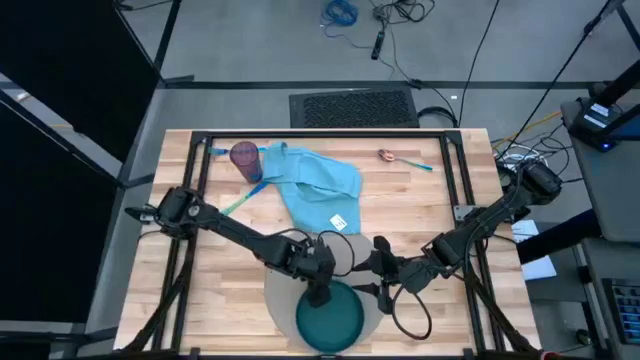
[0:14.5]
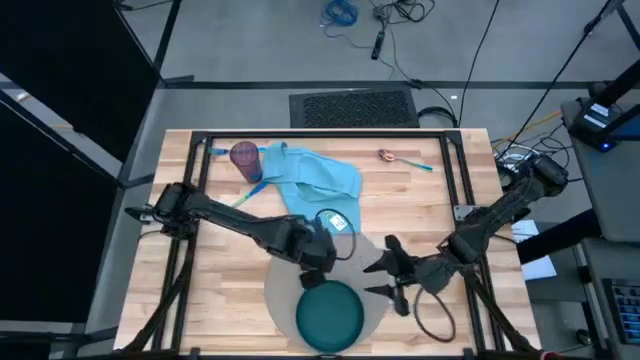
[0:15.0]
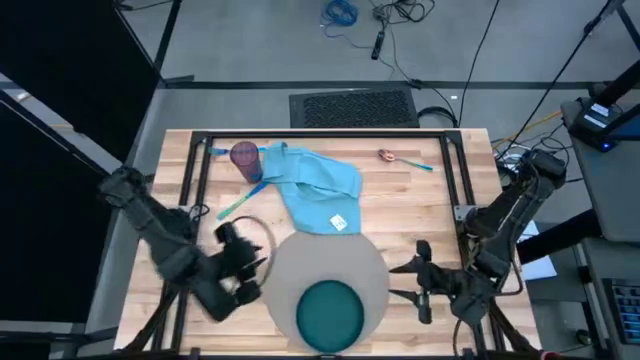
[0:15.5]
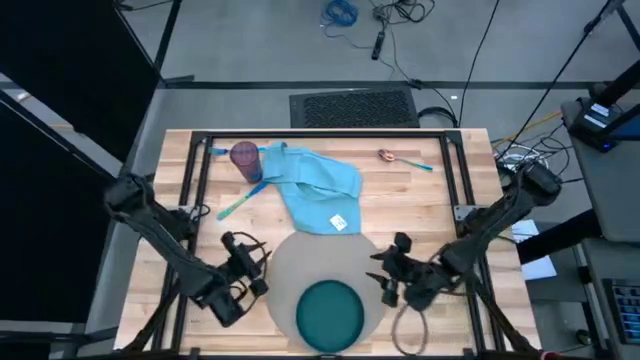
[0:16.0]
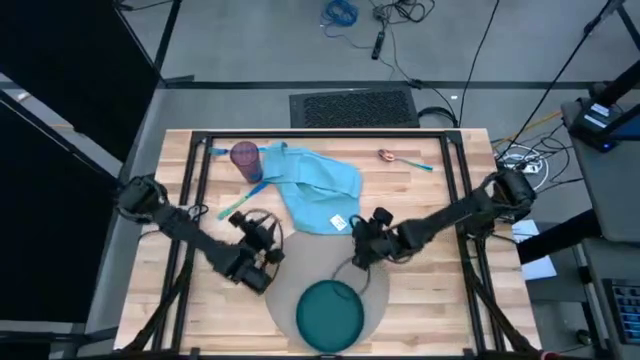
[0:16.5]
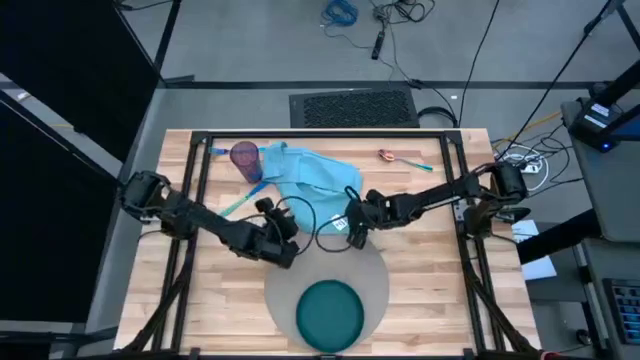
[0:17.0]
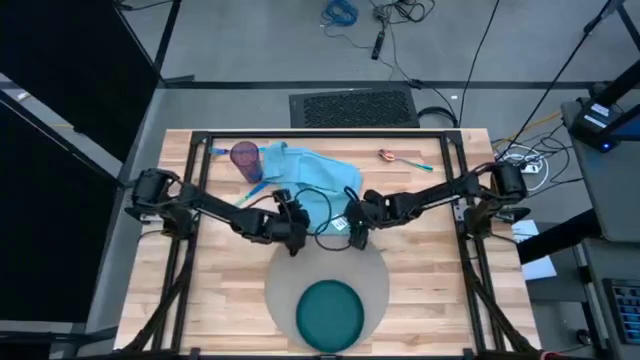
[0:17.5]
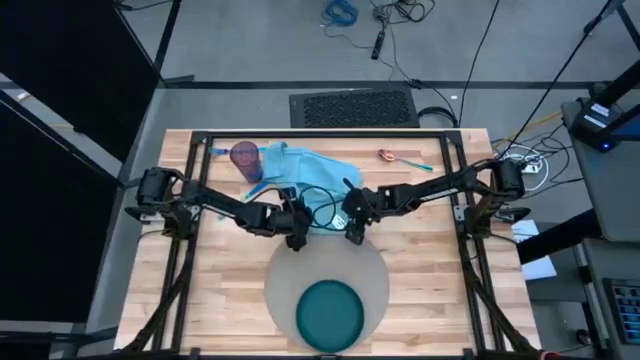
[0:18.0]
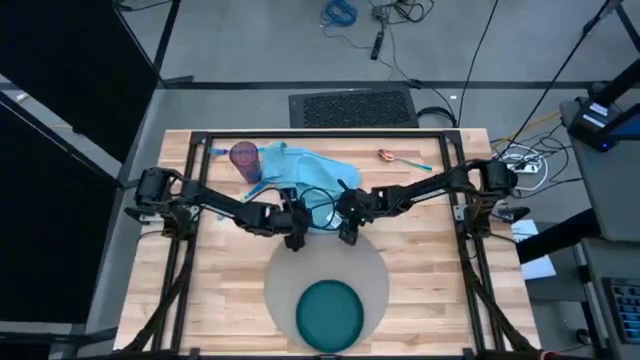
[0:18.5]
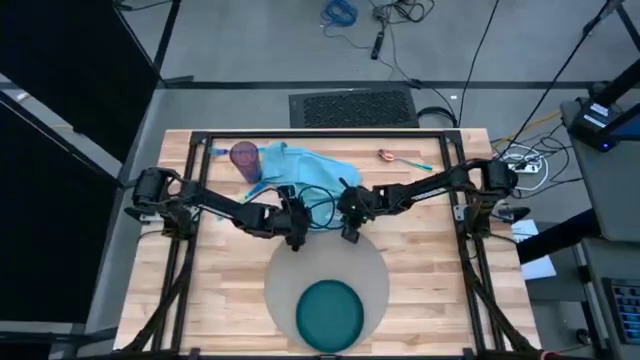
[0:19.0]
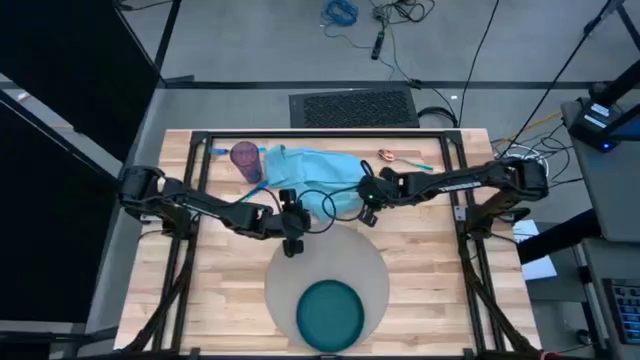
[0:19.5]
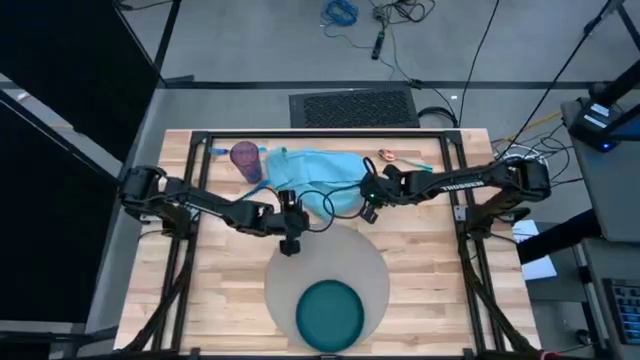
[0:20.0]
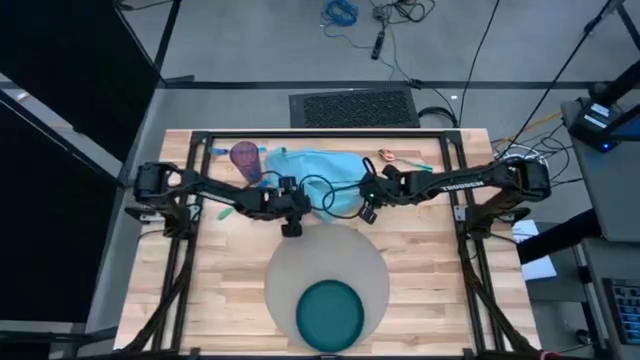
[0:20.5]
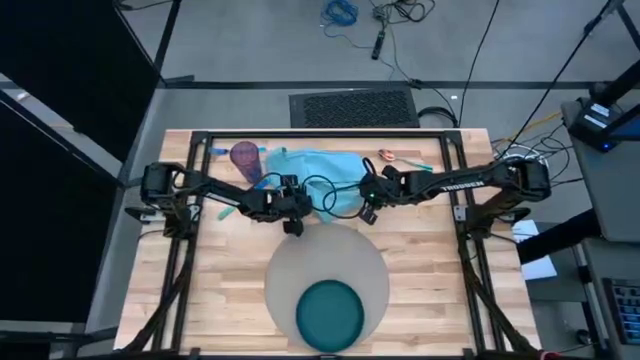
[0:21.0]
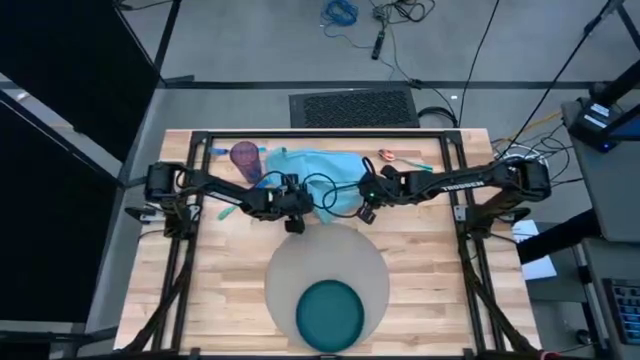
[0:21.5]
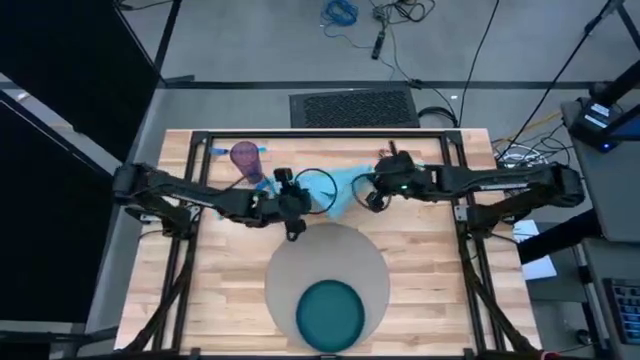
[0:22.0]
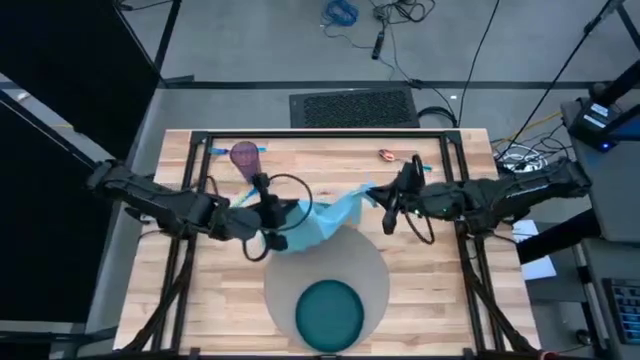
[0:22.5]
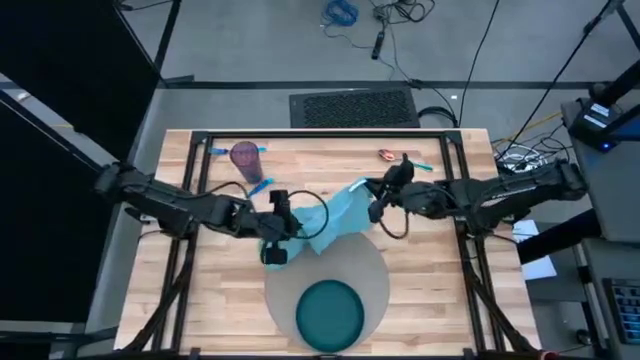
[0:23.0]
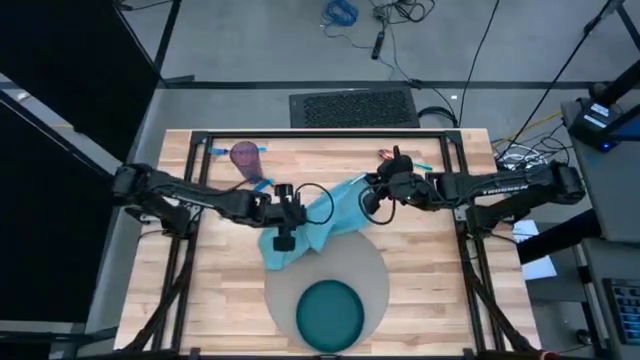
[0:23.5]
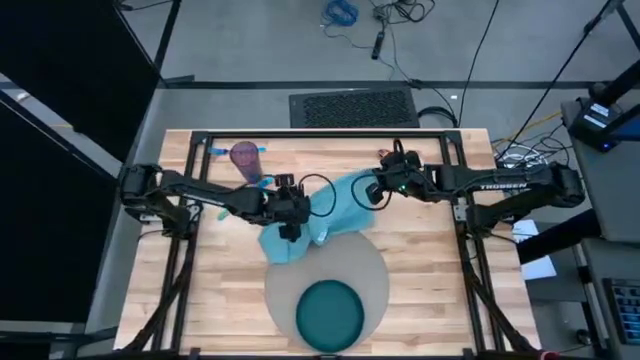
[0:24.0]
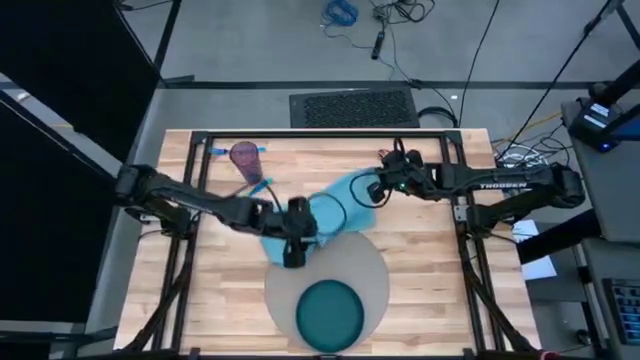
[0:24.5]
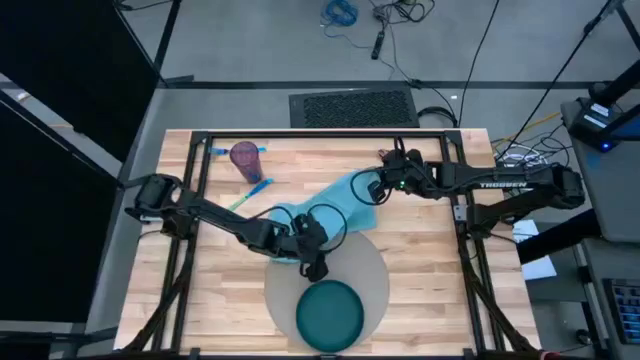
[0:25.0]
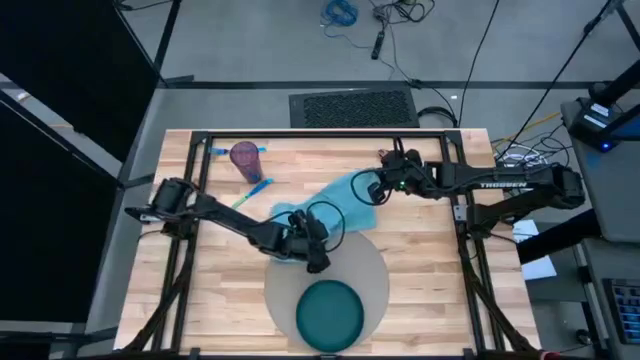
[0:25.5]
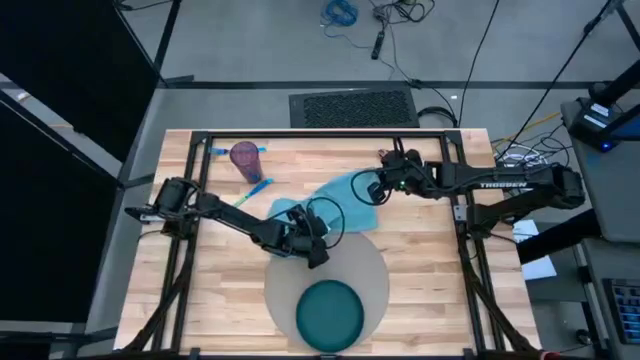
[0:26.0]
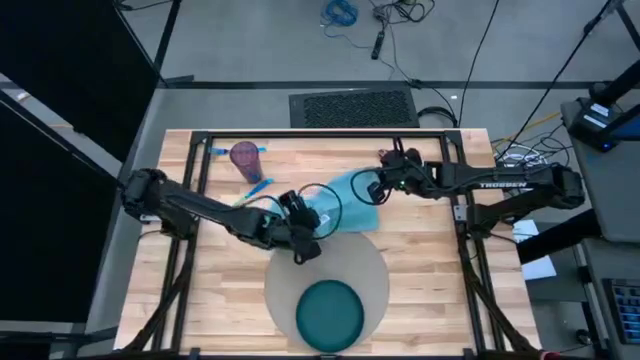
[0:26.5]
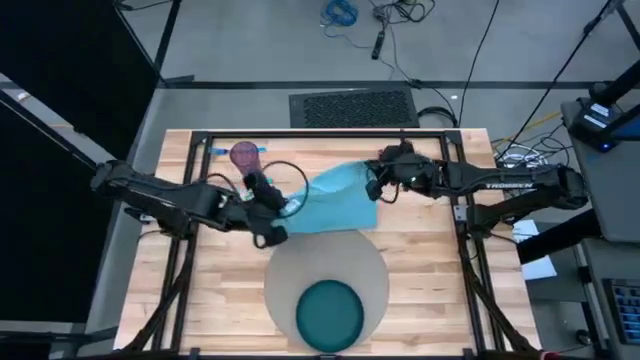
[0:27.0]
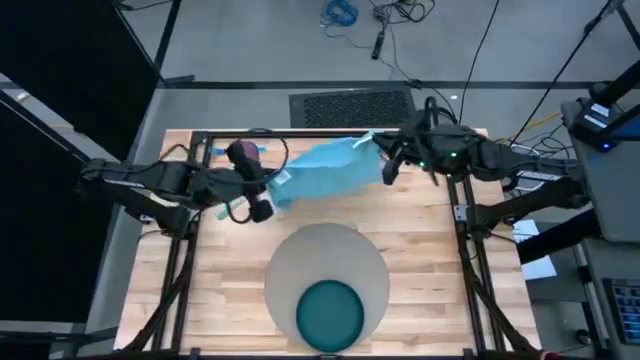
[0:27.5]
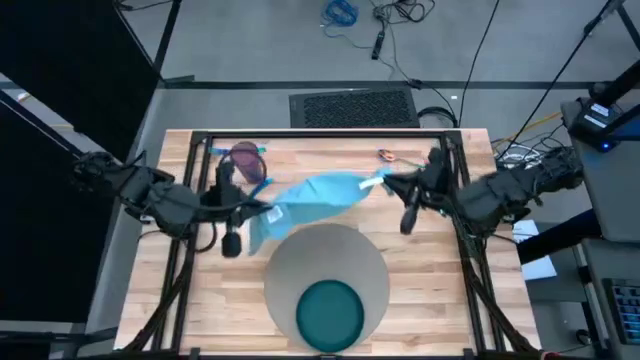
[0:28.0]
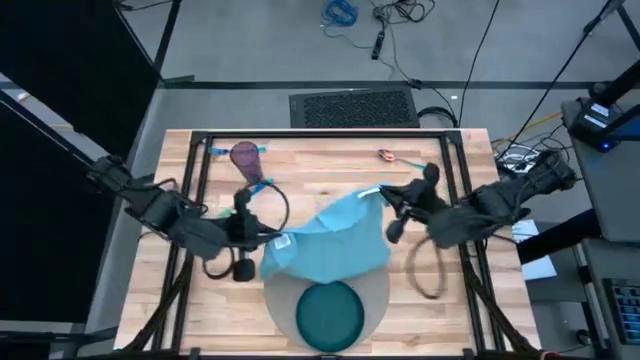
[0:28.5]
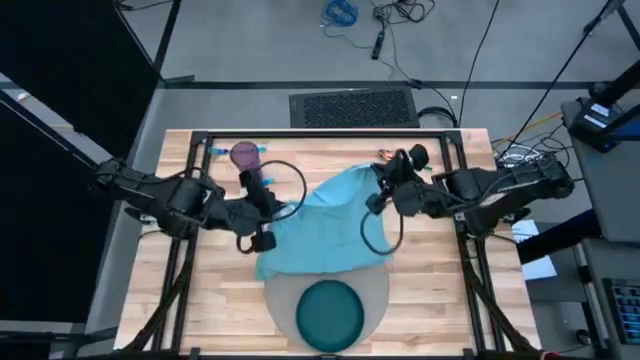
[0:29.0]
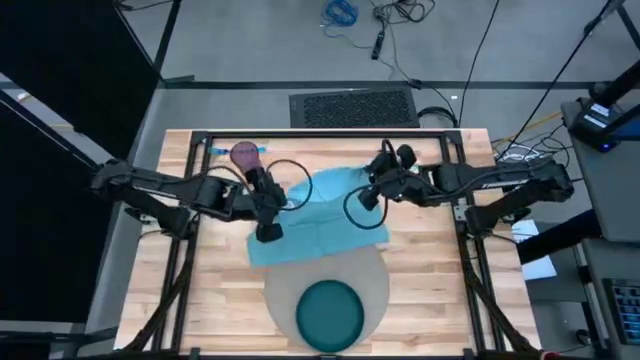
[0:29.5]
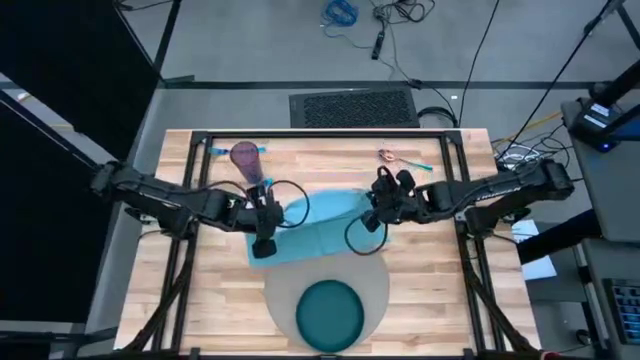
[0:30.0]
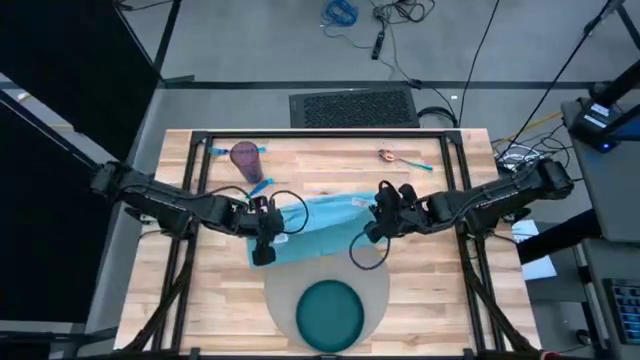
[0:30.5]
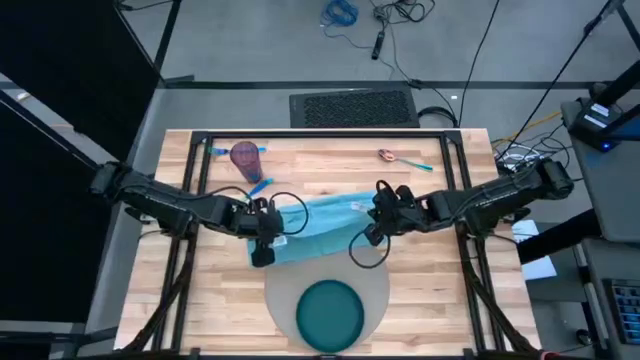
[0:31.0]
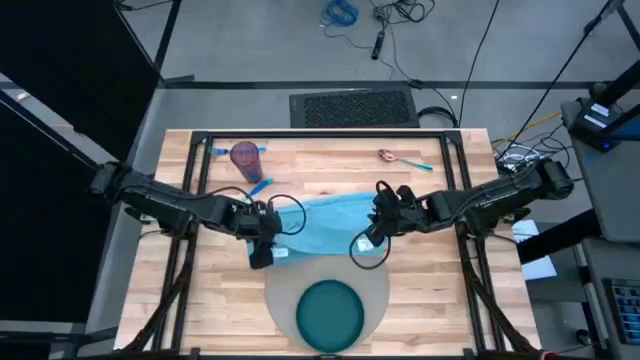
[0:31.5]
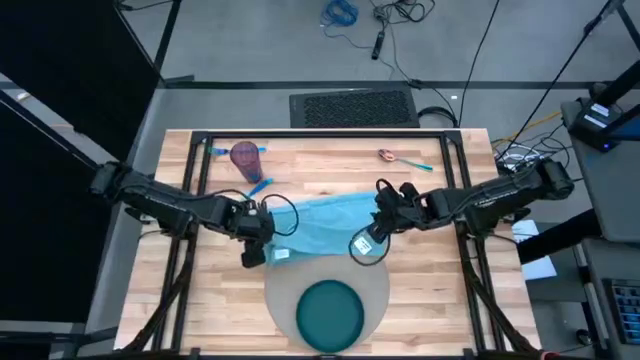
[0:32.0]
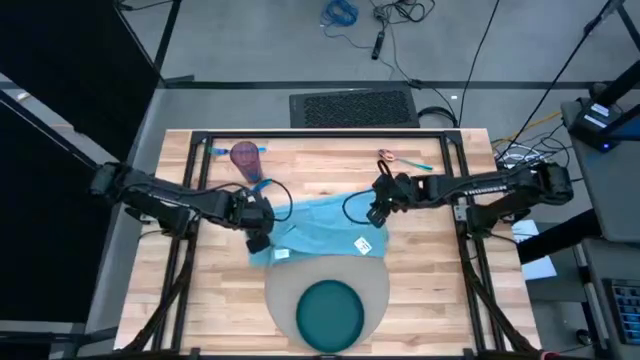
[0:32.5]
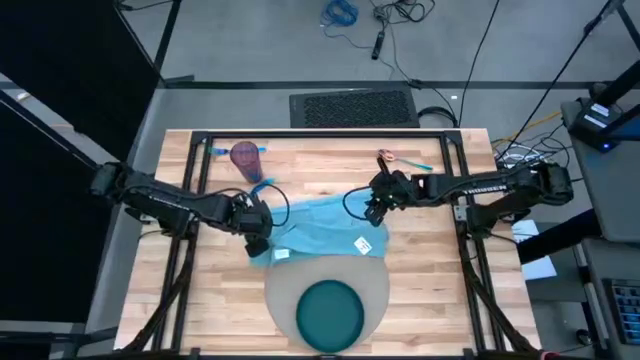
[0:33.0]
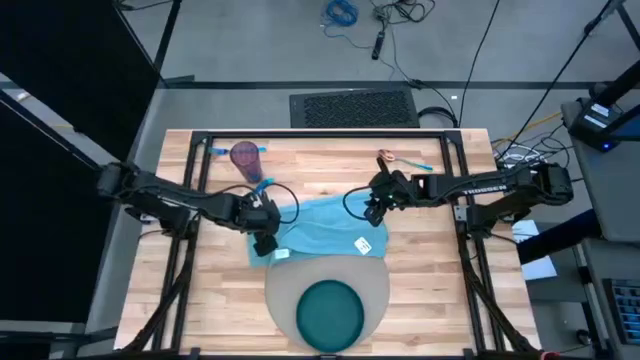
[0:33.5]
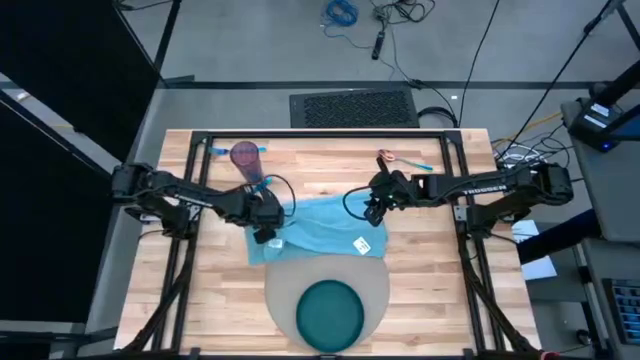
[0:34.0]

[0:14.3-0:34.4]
Task: Set table place
Fold the blue napkin
